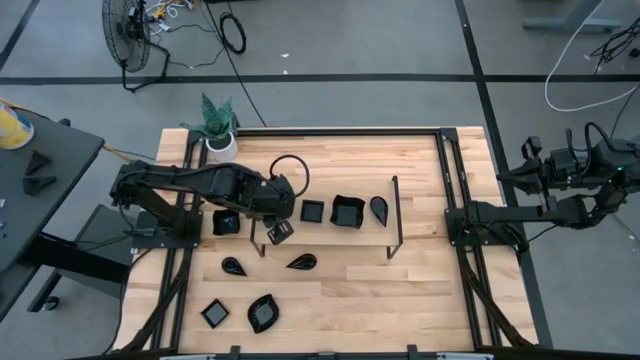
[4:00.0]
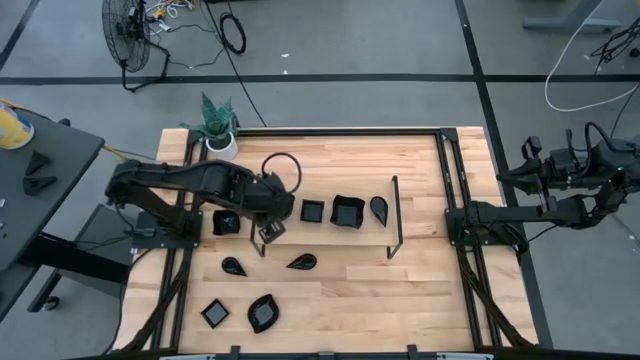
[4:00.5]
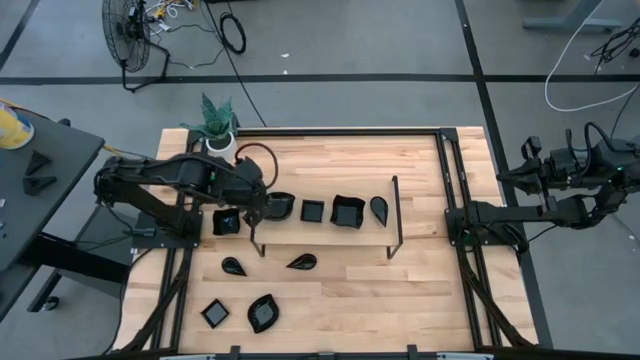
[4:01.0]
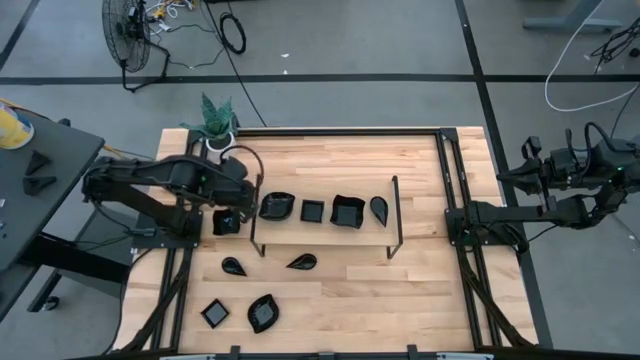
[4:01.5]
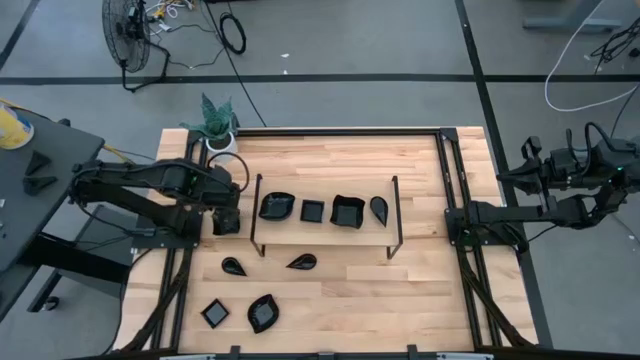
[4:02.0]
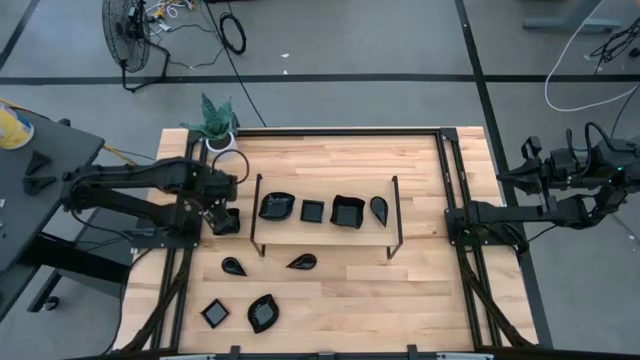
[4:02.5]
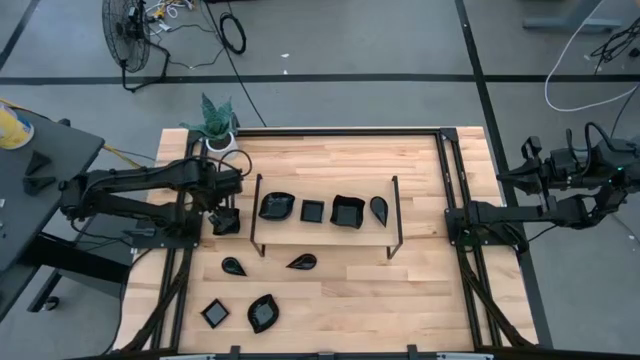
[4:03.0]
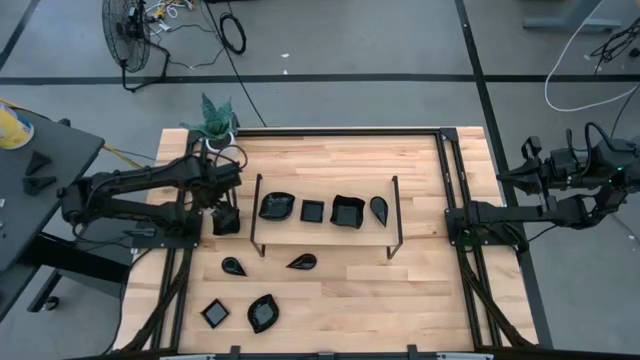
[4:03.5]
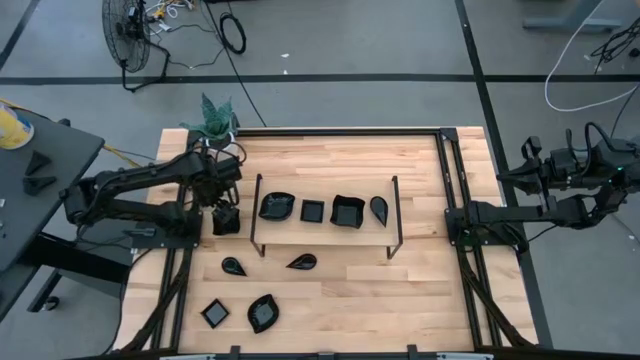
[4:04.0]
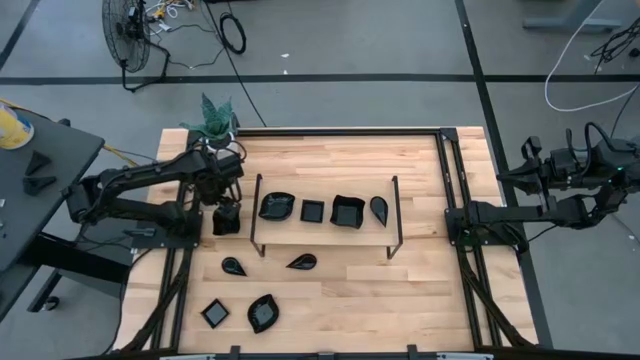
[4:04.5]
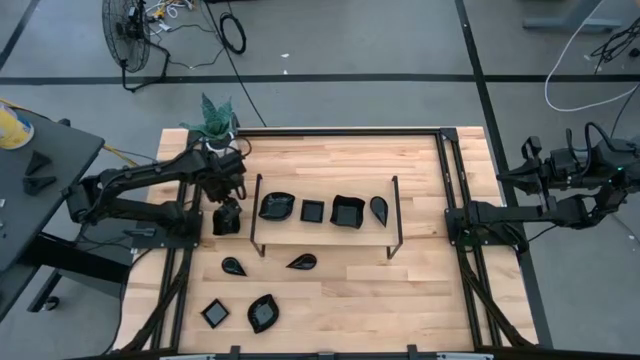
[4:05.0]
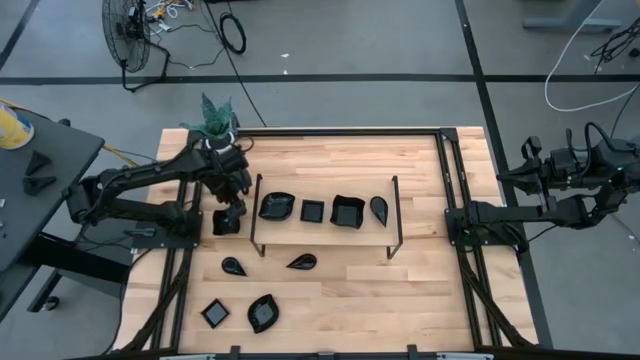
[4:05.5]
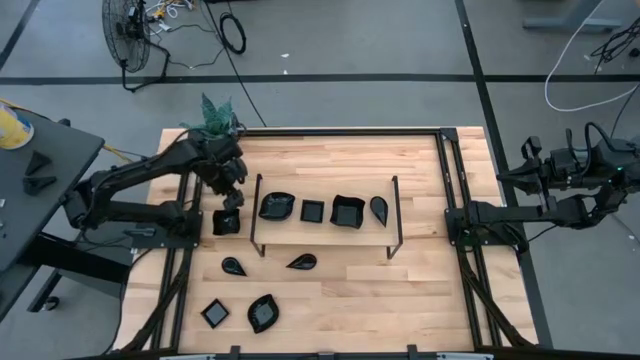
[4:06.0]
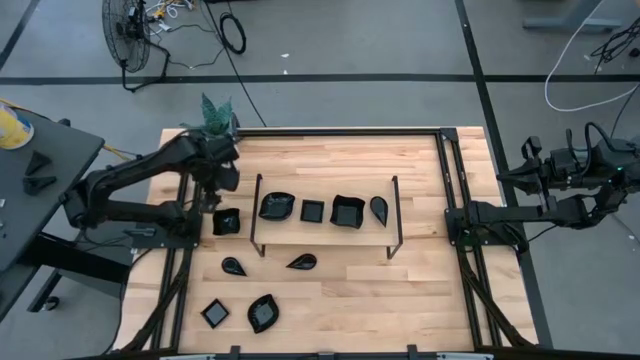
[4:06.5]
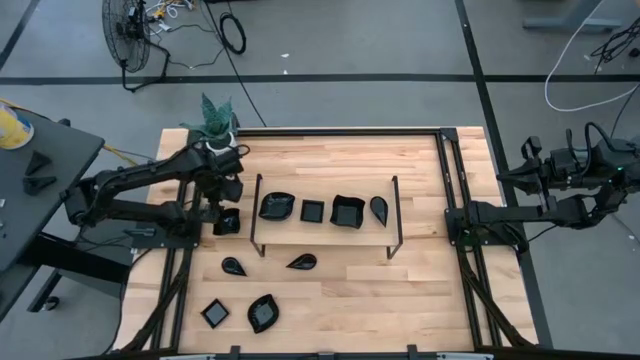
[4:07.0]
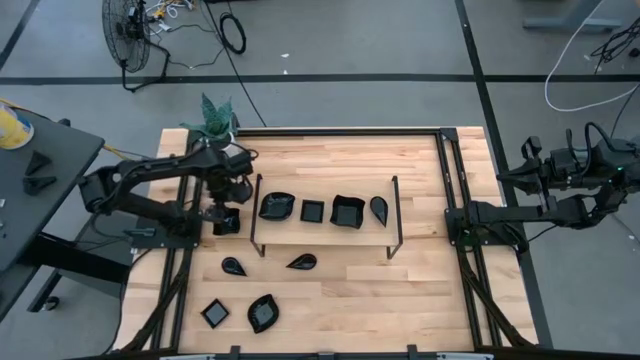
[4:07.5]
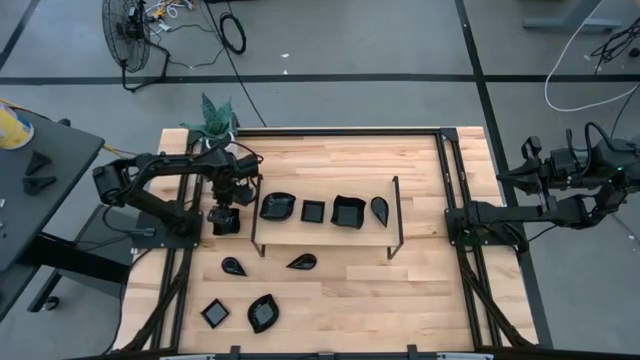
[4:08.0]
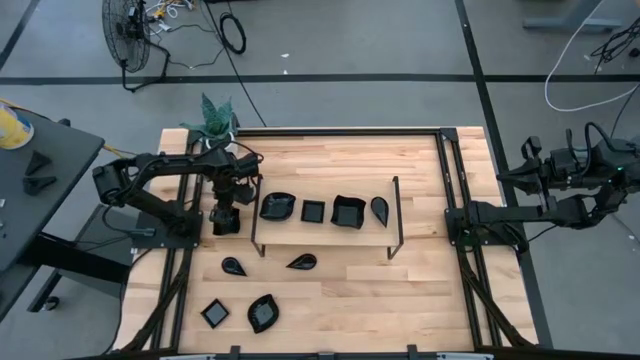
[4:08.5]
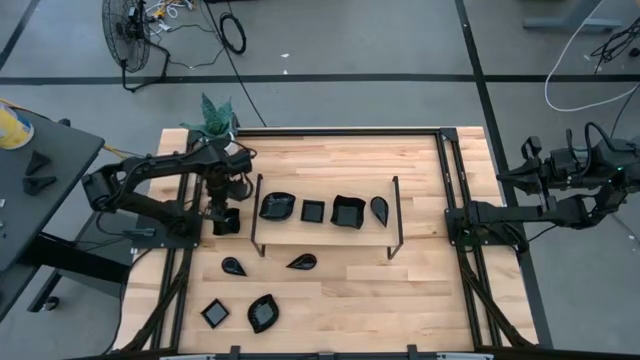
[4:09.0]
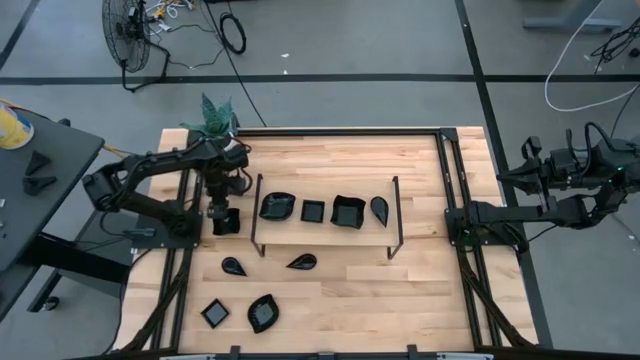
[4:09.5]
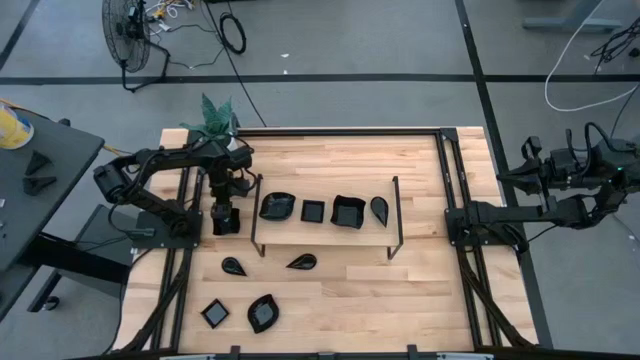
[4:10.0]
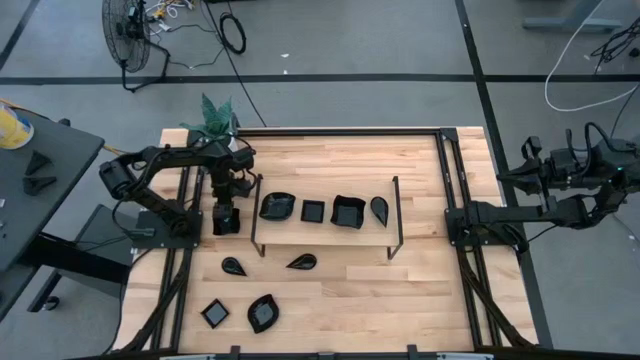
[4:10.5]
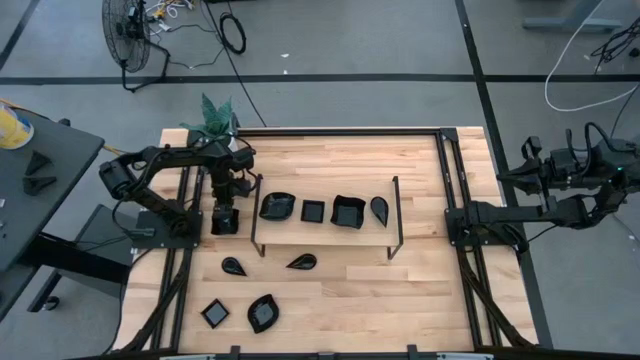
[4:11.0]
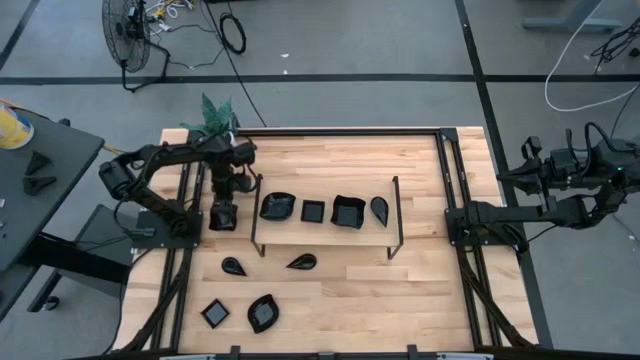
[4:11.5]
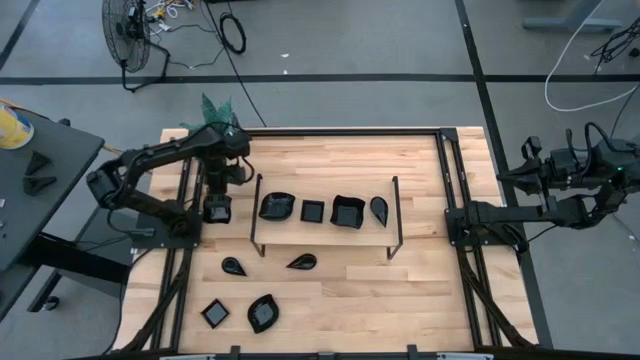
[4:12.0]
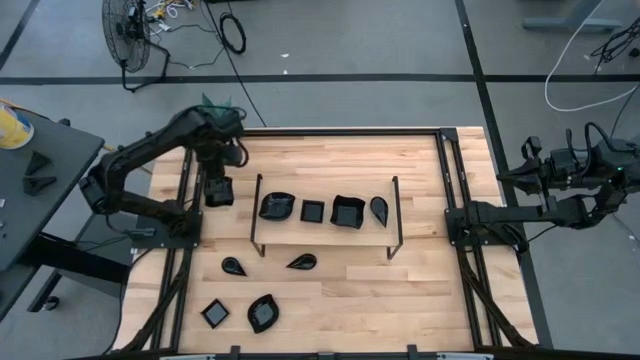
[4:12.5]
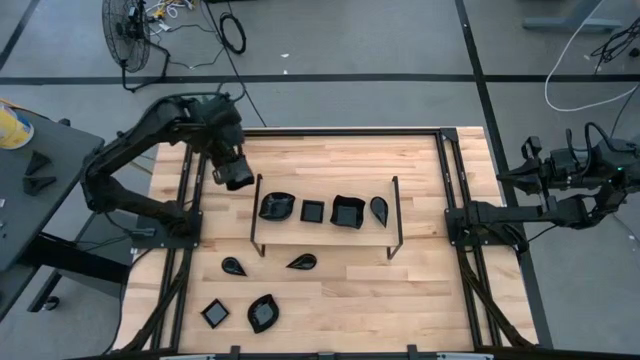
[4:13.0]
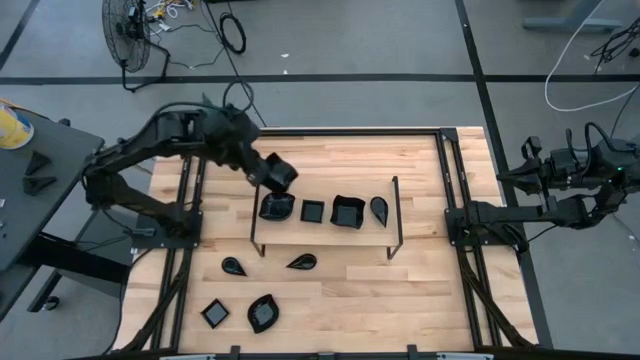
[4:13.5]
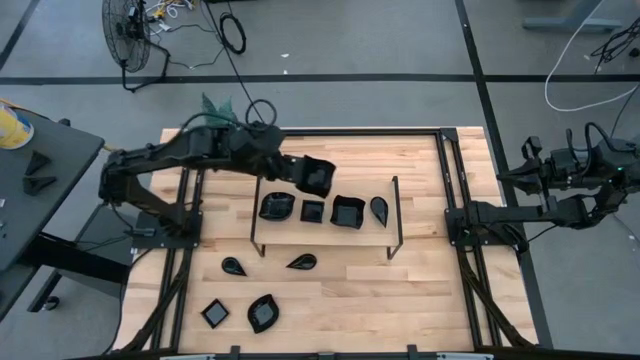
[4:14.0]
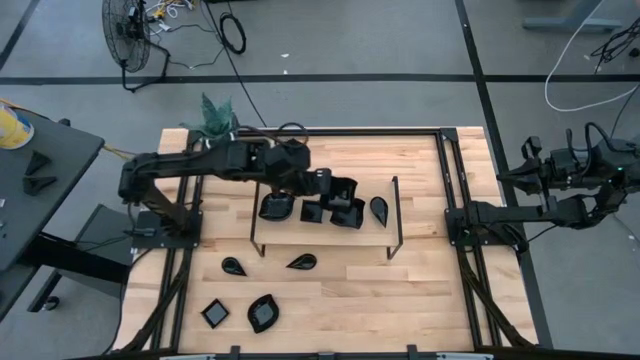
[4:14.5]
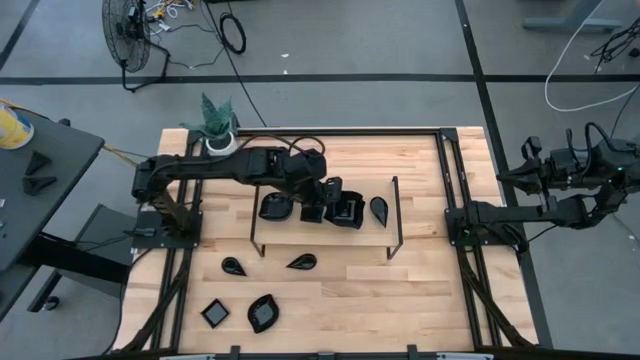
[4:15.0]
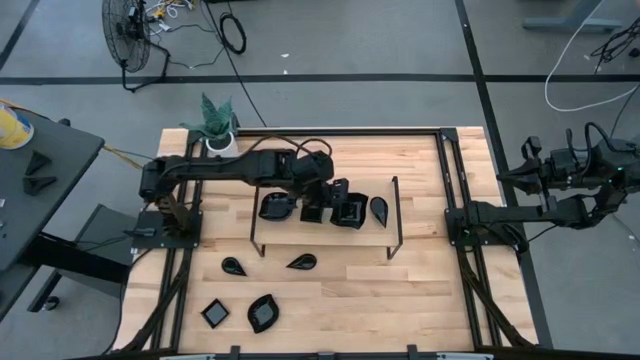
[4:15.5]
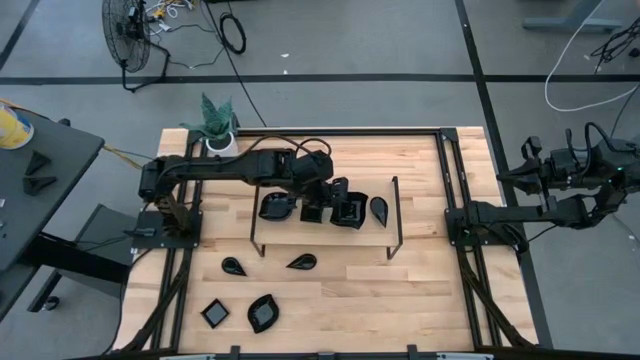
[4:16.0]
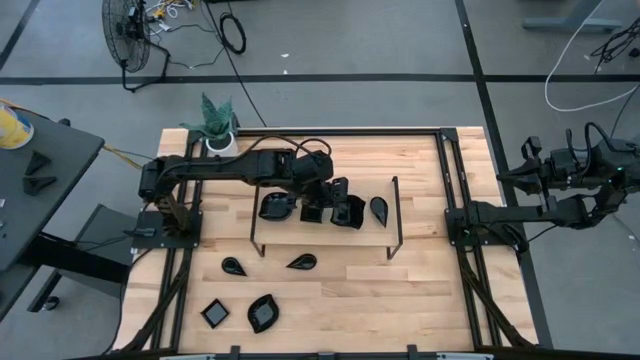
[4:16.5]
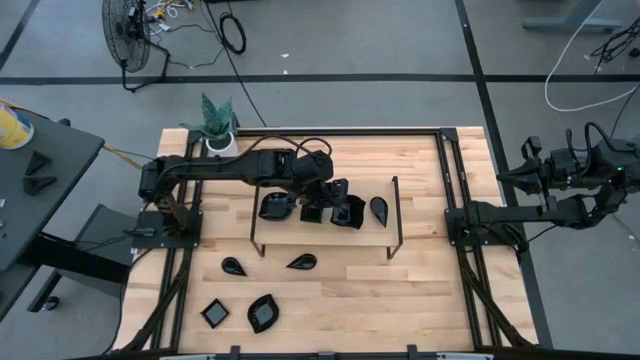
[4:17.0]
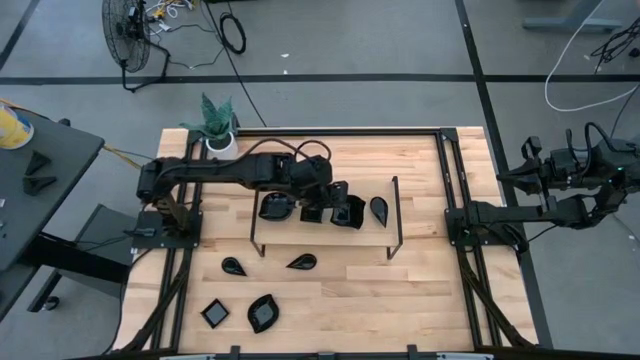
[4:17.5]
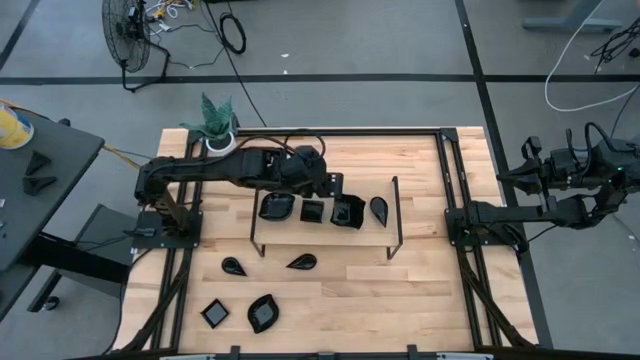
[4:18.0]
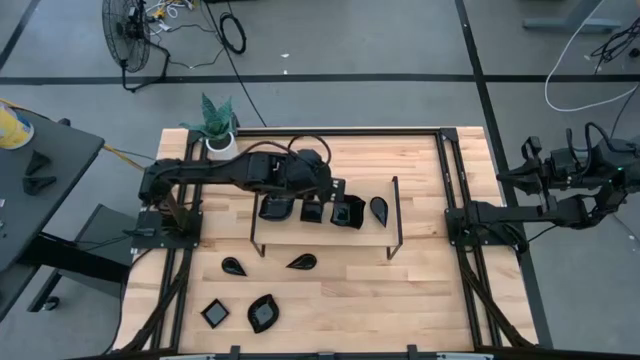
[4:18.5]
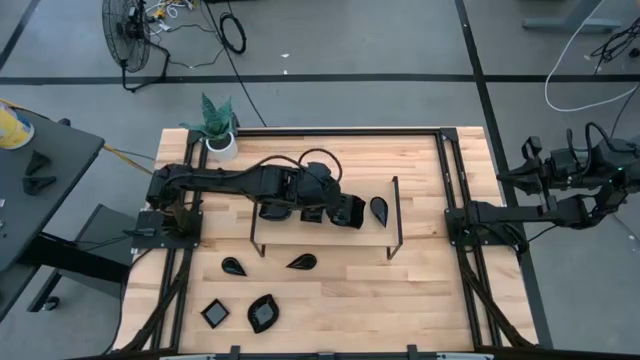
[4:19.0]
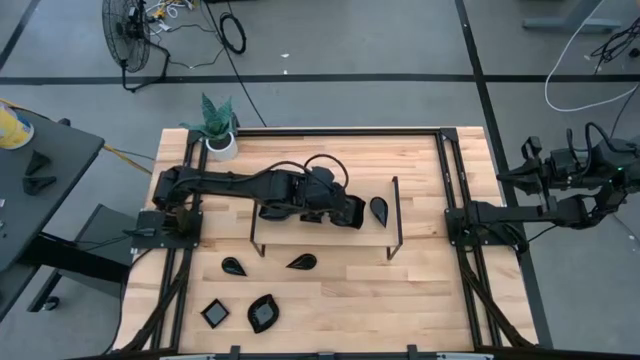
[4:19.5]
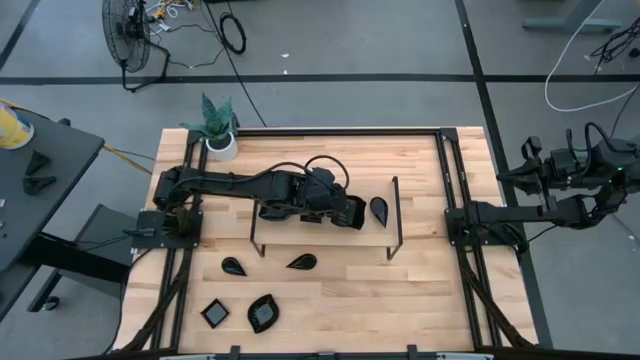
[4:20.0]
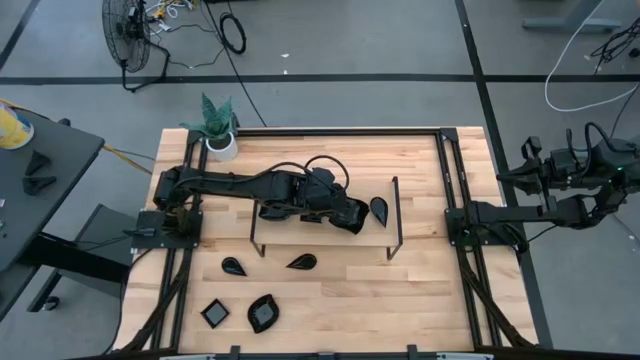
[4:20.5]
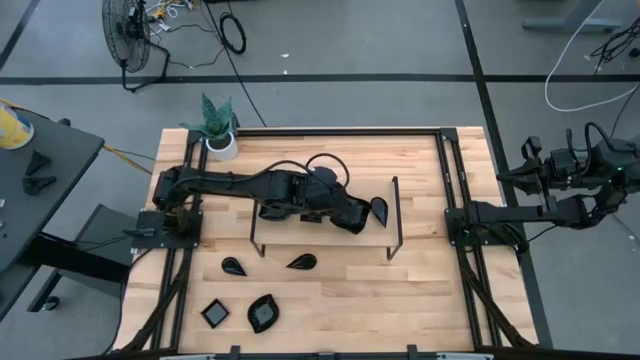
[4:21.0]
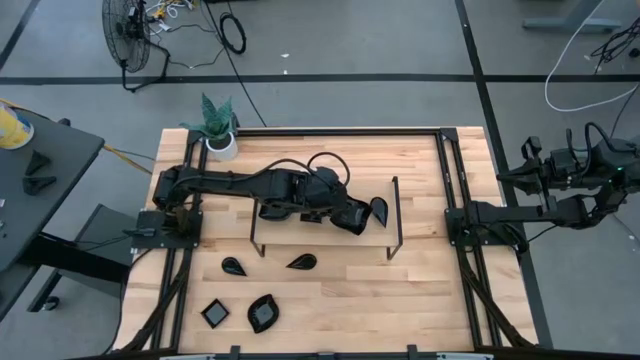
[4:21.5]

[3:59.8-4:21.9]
Task: Pick & Place Mini shaped plates
Stack the distorted square plate on top of the distorted square plate on the shelf
